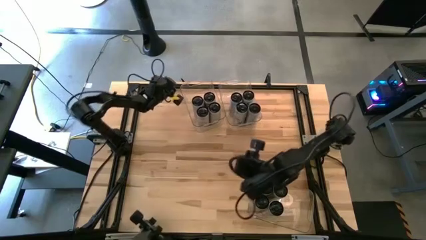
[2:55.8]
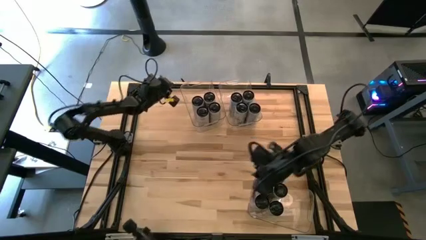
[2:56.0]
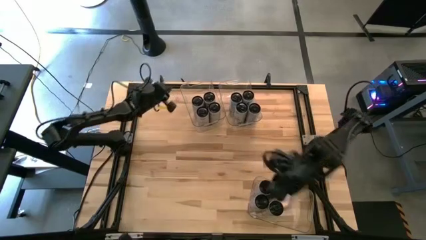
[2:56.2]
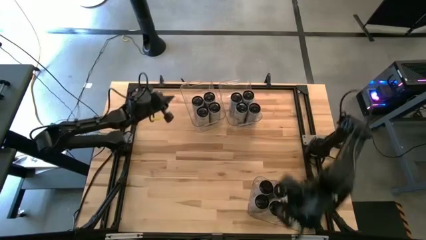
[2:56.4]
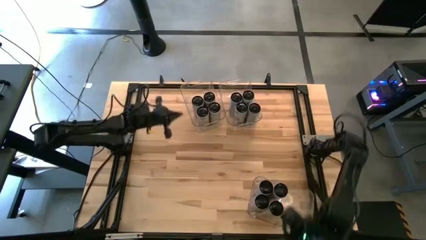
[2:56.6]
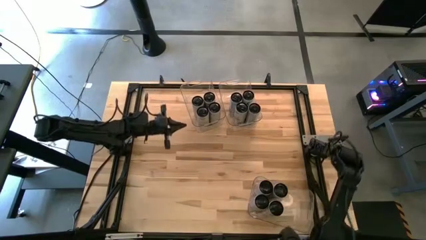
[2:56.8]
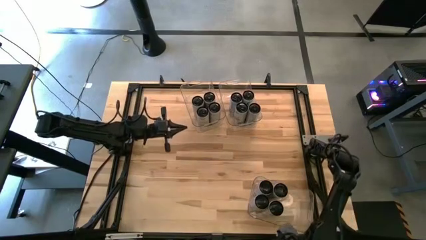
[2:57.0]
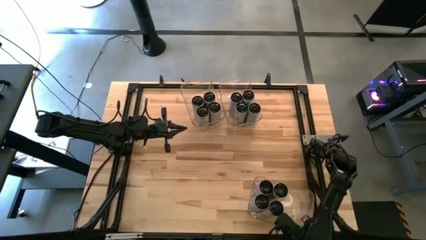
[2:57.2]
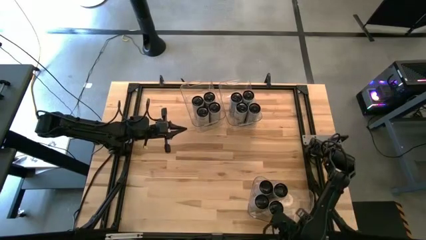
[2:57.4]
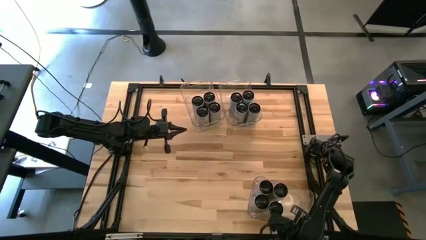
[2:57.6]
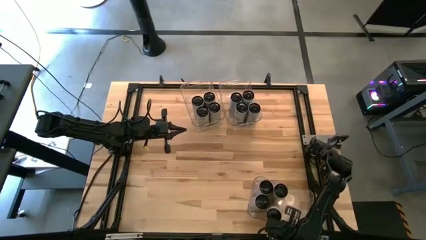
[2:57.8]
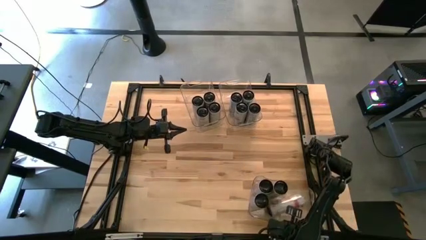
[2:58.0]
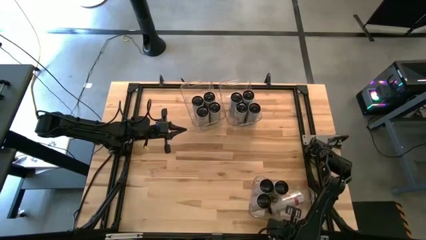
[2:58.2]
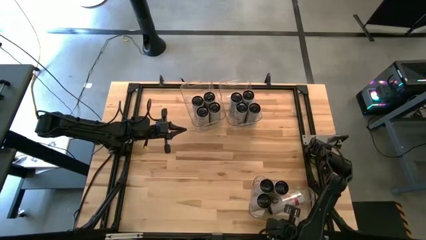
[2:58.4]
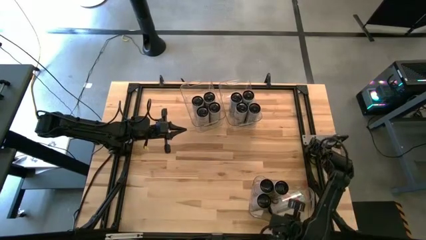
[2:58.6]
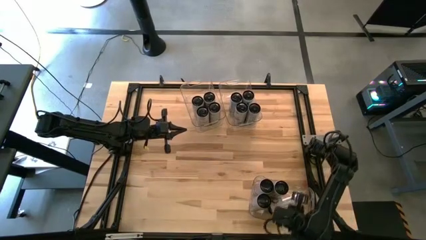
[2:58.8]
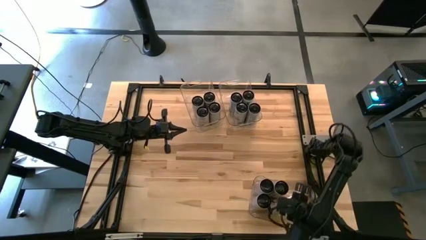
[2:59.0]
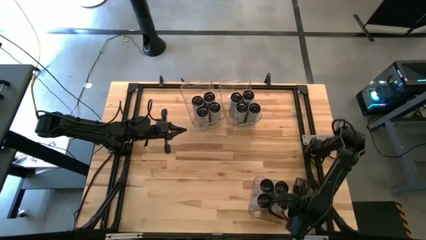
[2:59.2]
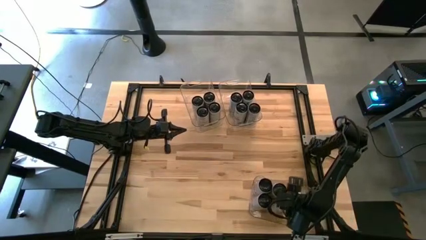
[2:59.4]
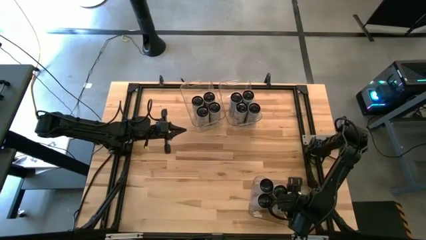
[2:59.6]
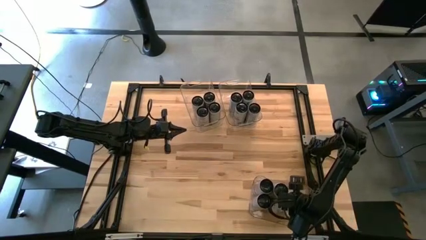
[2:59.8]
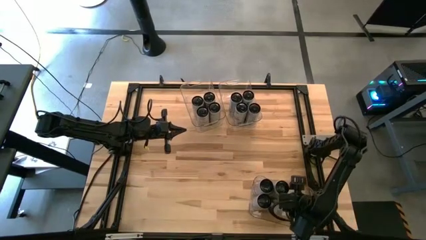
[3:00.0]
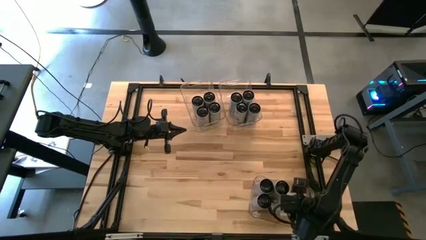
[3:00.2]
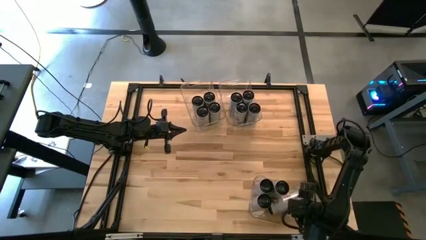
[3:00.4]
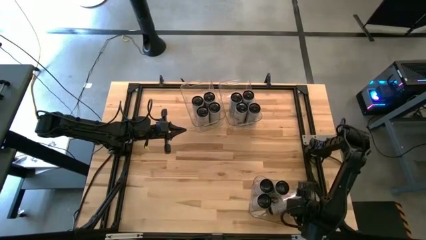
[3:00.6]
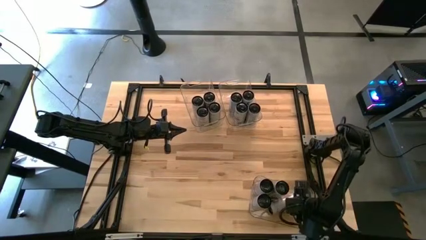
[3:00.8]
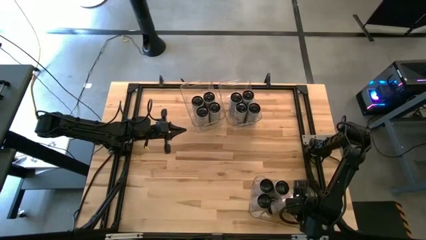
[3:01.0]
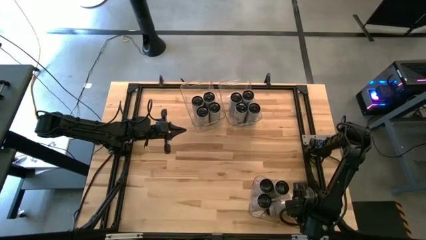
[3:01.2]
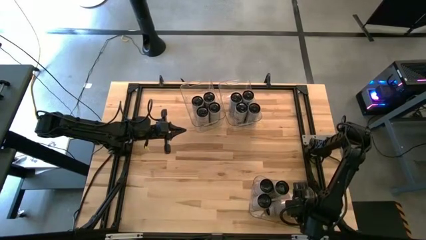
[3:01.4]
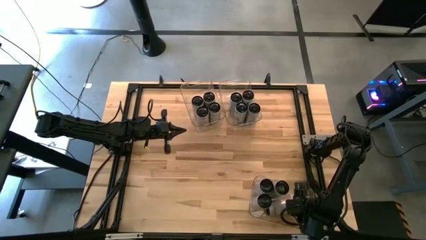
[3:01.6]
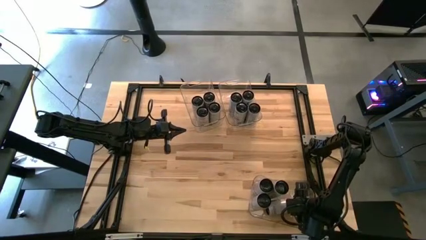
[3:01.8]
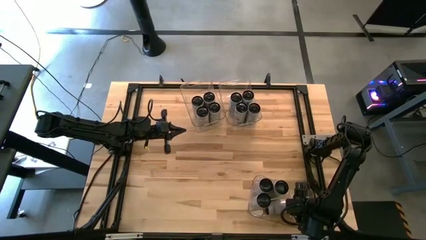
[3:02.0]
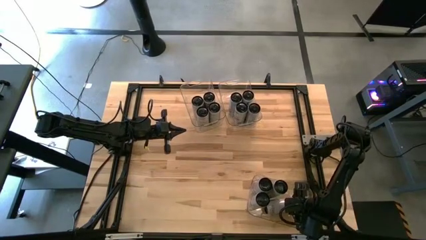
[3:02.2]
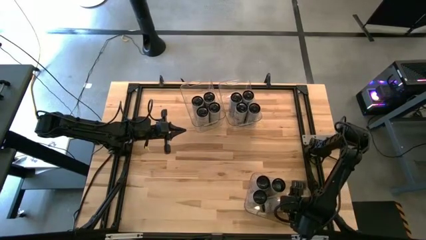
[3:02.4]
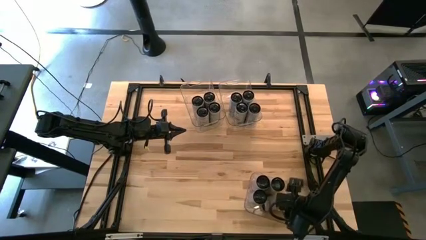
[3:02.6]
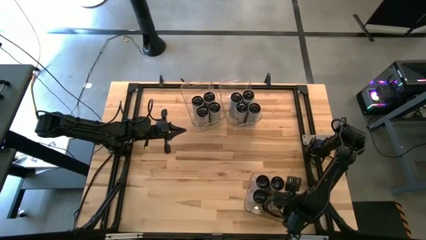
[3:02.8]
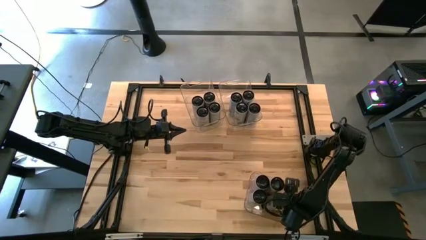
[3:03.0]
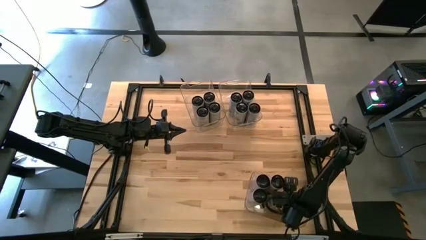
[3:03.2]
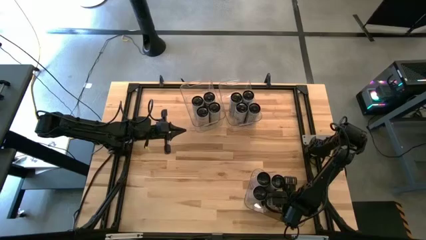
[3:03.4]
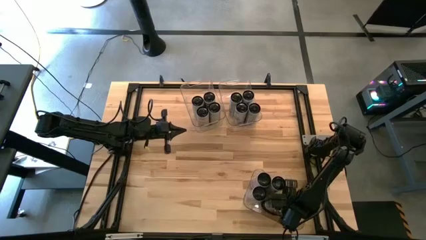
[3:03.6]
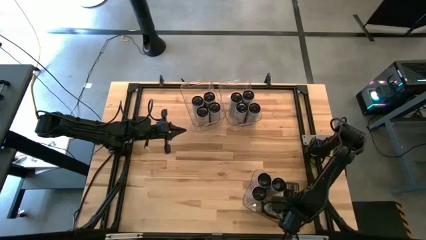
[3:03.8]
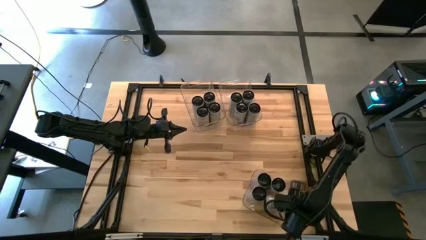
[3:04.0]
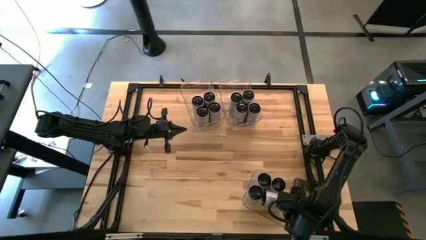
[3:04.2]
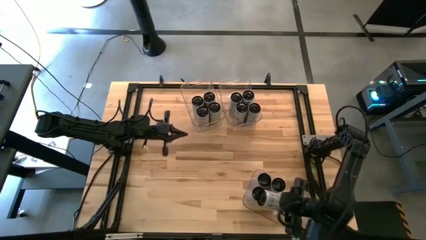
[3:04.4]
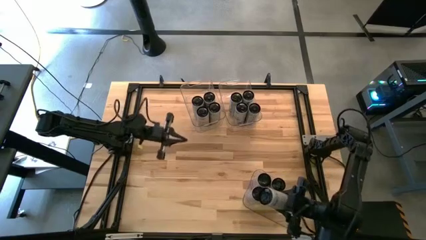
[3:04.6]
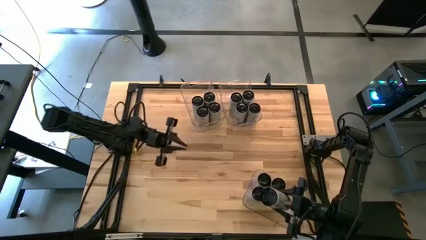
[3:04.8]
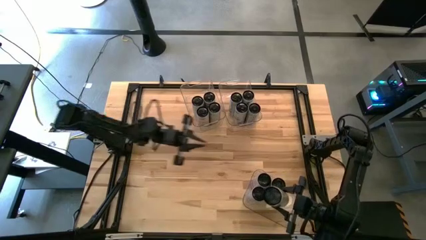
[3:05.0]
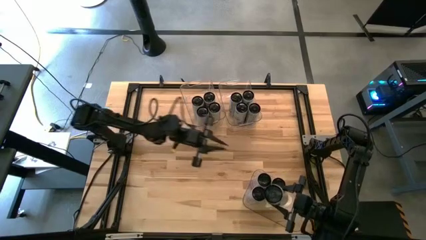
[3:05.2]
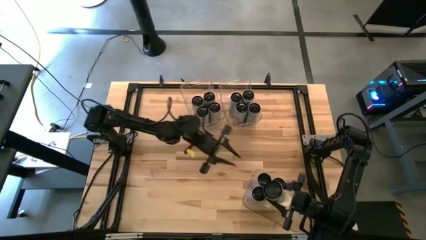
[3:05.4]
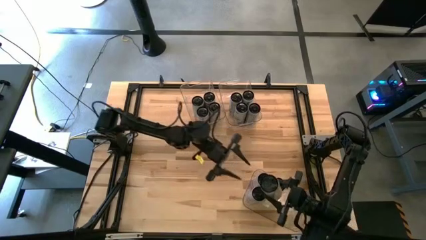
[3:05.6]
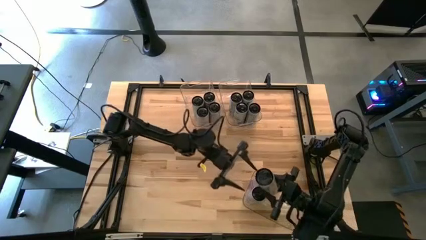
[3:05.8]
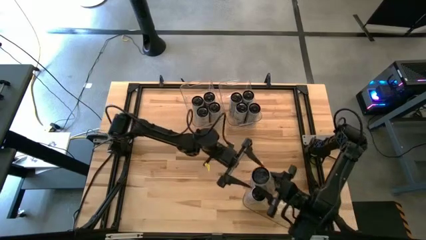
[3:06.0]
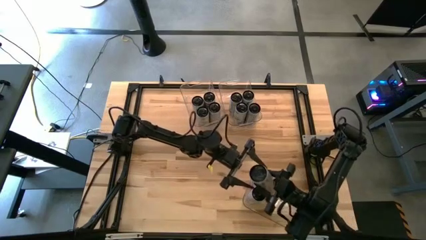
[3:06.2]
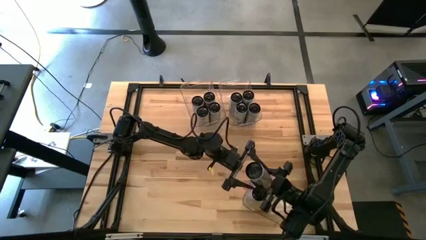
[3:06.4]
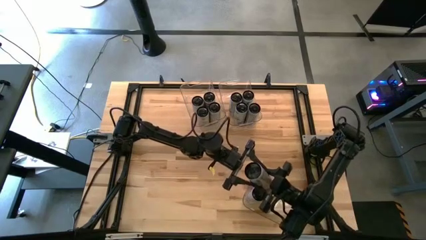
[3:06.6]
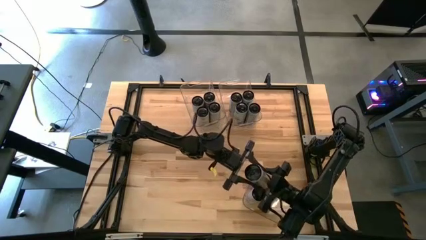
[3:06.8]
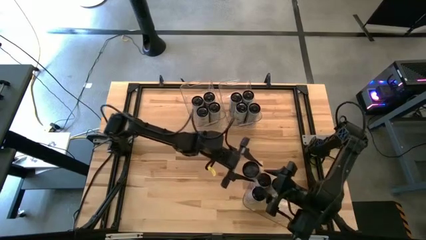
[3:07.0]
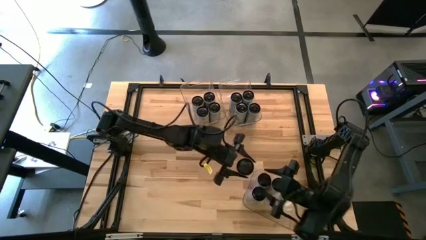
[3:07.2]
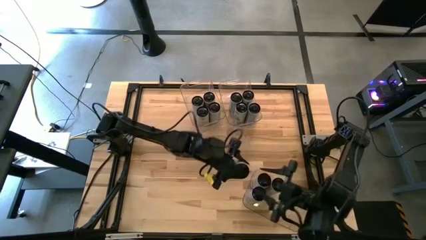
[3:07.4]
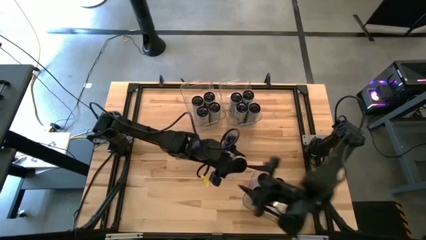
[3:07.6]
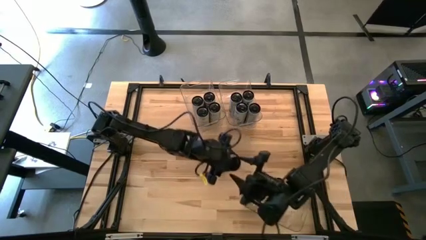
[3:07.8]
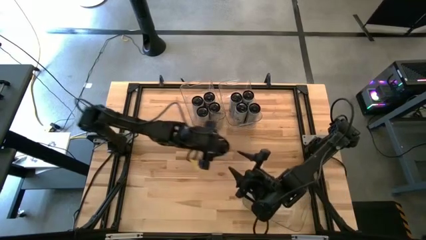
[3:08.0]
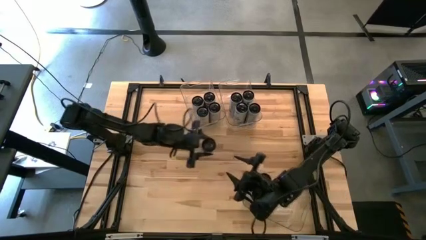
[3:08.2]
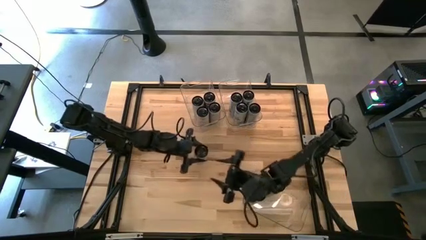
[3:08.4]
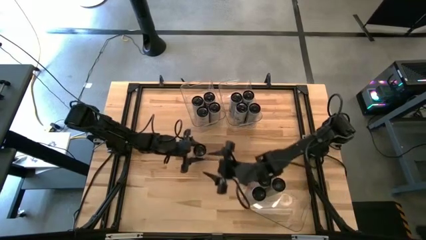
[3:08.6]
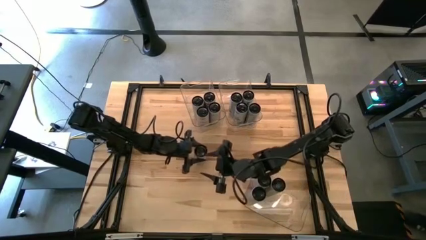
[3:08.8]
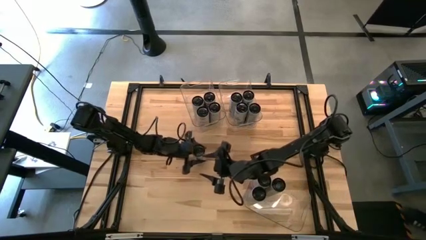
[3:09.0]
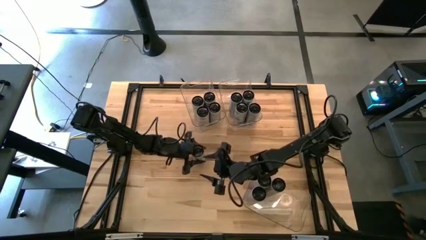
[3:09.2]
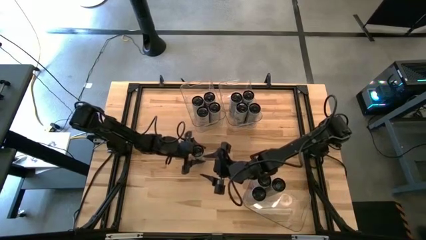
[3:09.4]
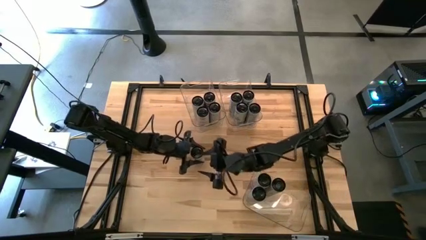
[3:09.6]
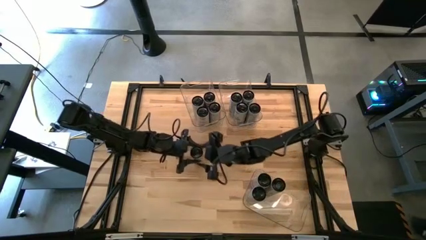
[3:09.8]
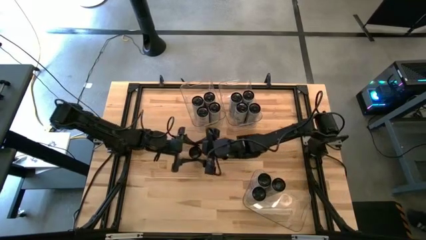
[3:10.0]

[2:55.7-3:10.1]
Task: Sort soda cans
Remove the white-pink soda can from the bottom right transparent bin

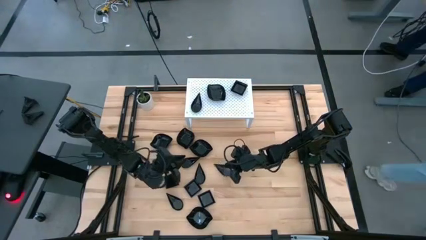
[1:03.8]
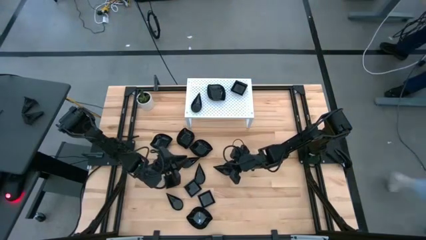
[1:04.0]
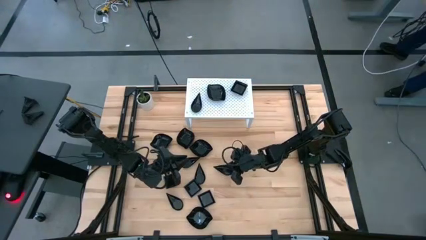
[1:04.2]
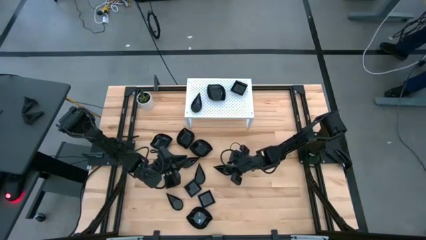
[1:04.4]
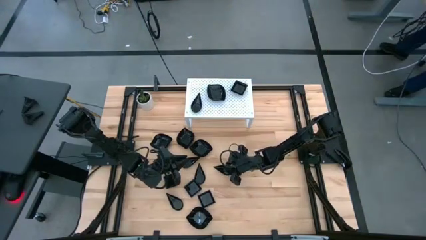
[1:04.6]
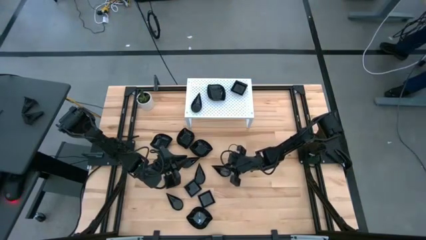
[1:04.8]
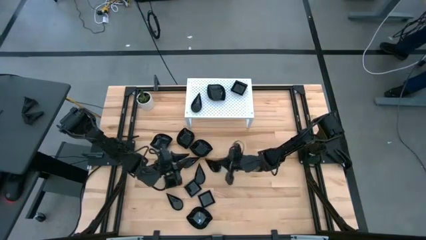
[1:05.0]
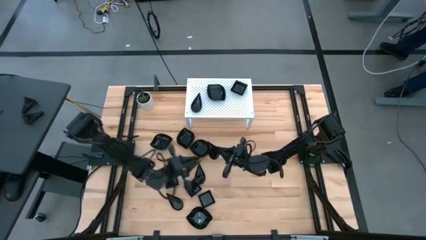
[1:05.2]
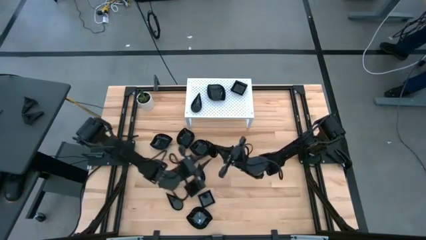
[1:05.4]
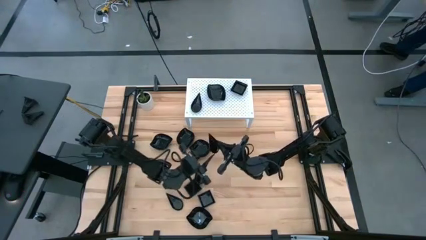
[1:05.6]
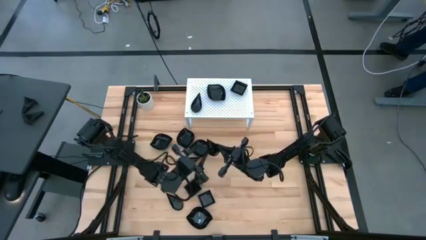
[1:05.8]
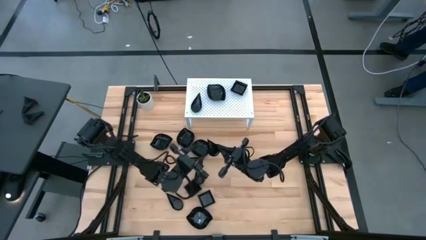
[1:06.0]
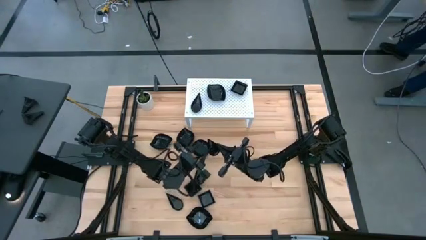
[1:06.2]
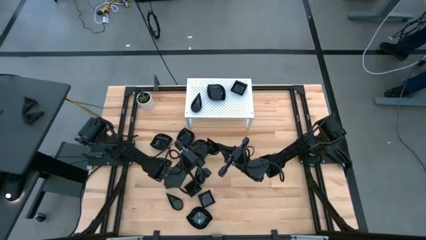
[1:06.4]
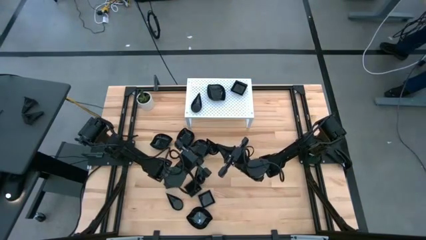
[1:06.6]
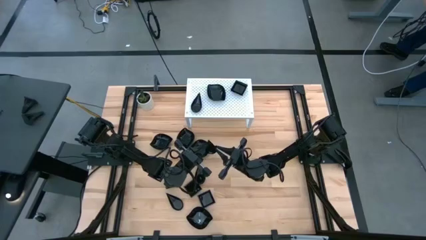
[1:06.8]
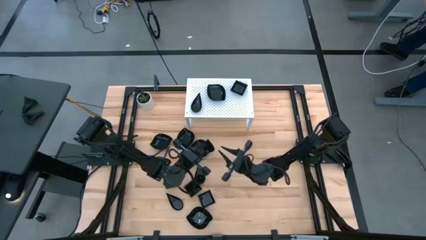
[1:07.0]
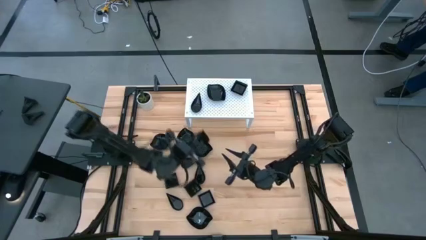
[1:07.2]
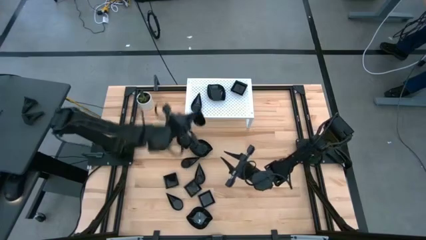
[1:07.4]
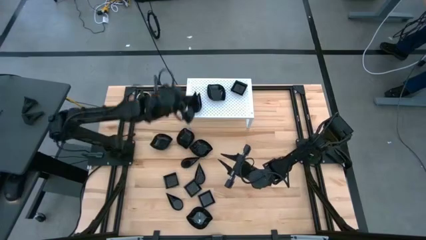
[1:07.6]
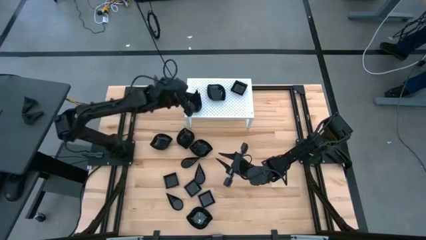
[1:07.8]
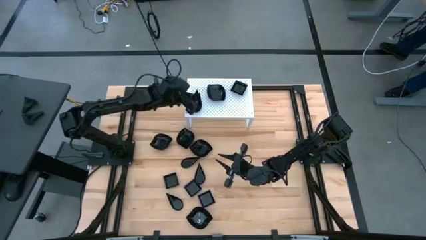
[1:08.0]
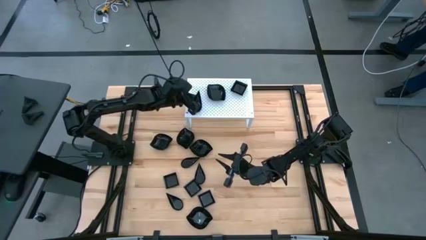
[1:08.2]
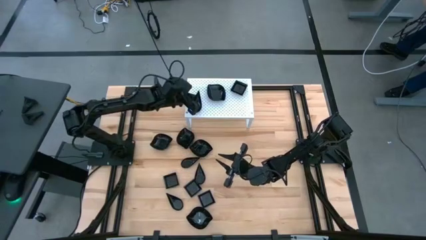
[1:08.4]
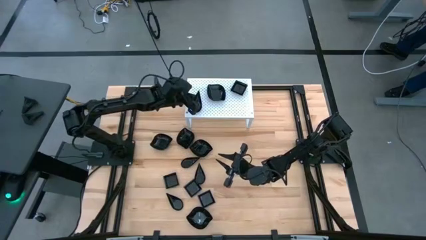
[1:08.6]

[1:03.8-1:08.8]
Task: Pick & Place Mini shaped plates
Stack the black drop-shaped plate on top of the other black drop-shaped plate on the shelf
